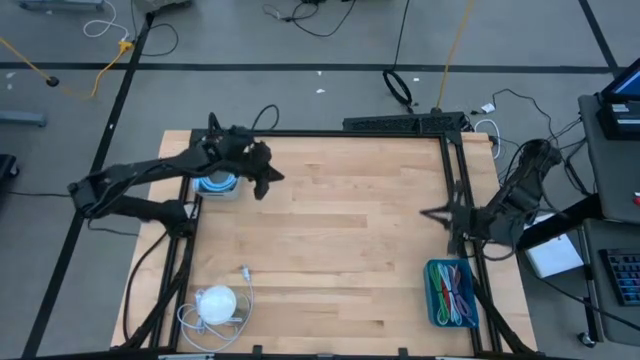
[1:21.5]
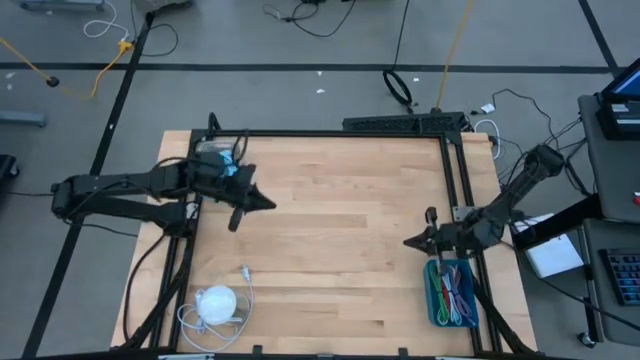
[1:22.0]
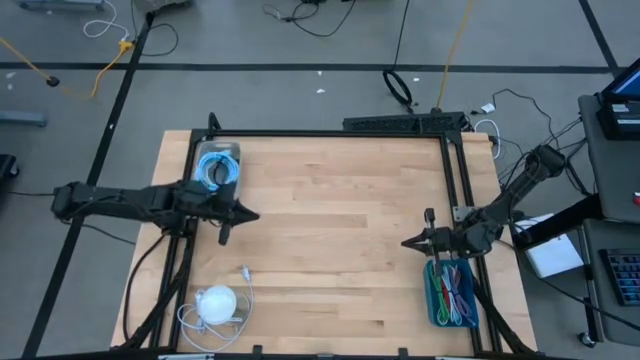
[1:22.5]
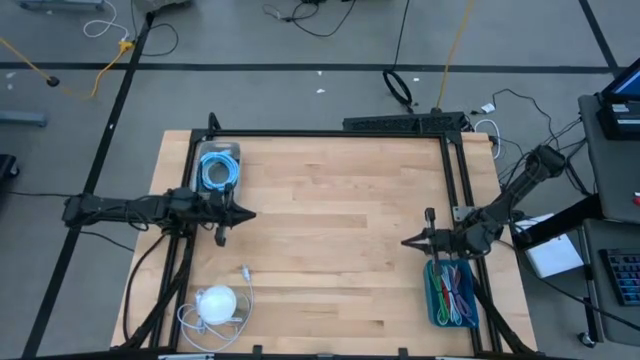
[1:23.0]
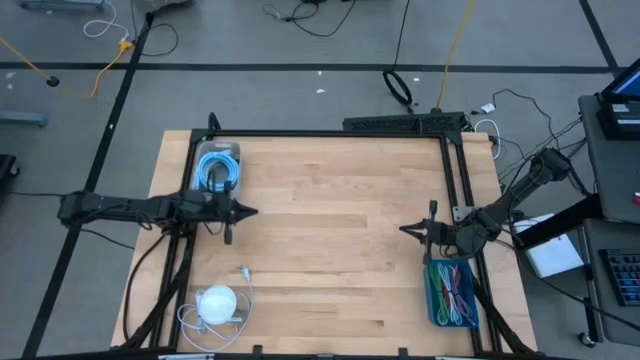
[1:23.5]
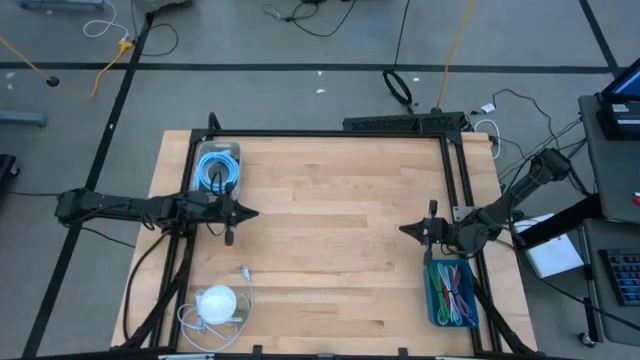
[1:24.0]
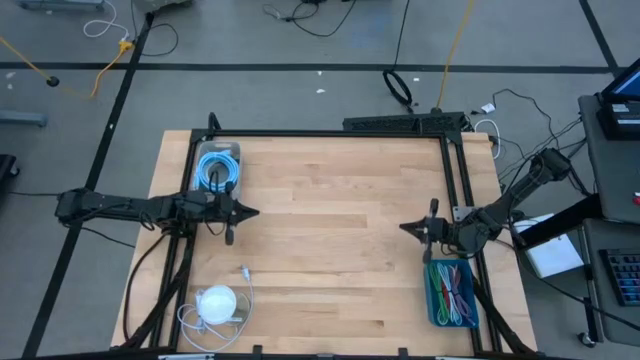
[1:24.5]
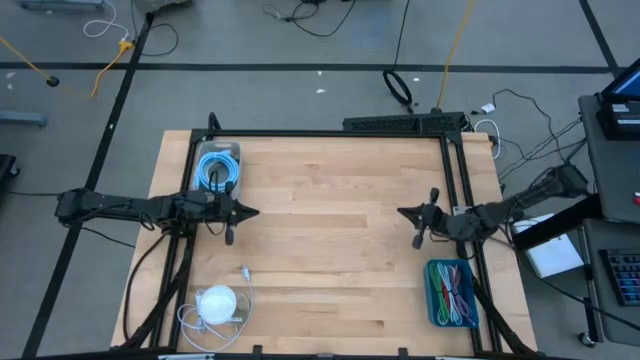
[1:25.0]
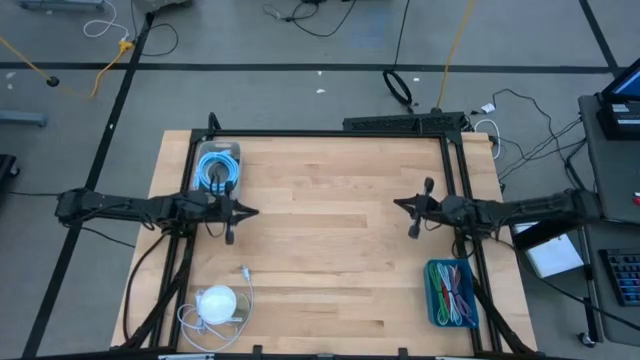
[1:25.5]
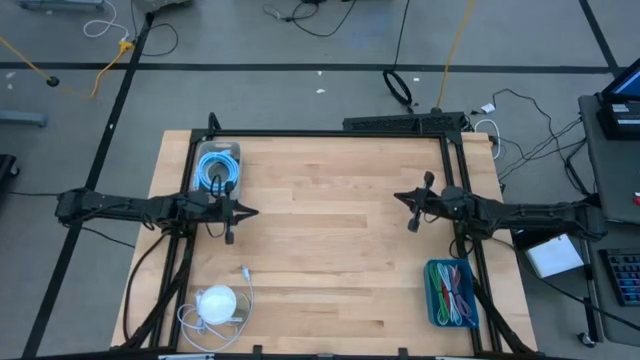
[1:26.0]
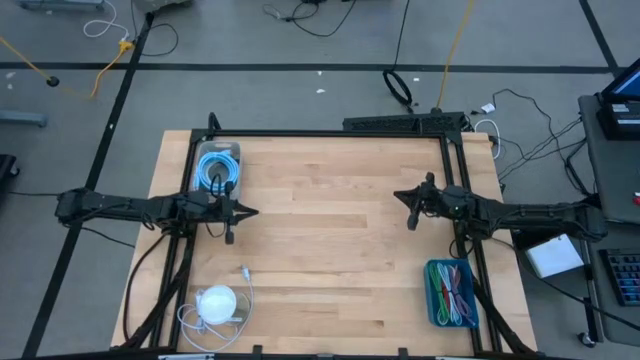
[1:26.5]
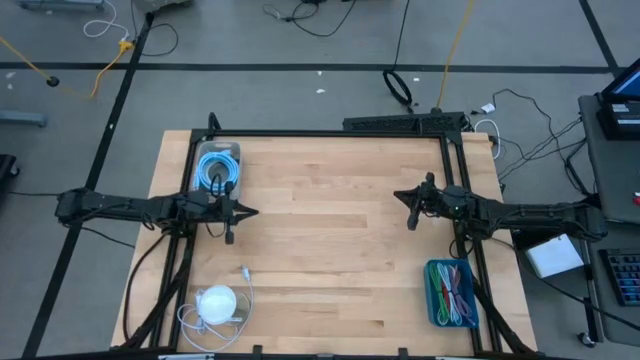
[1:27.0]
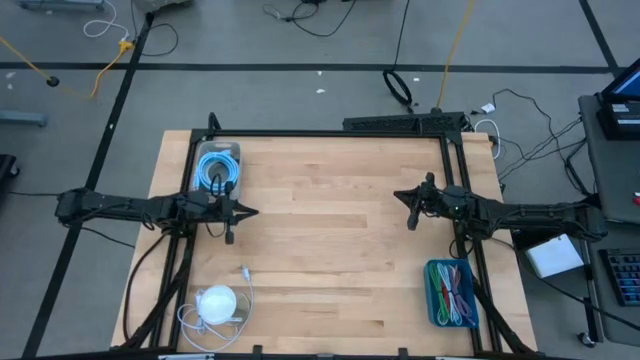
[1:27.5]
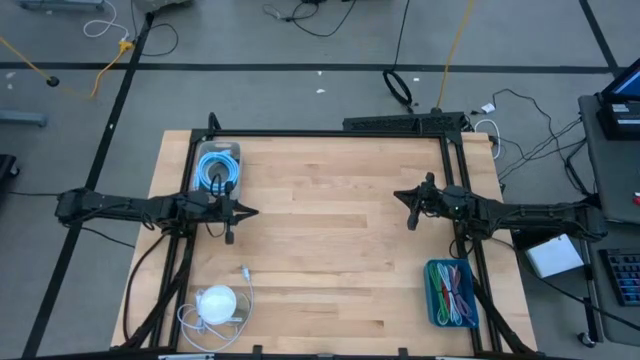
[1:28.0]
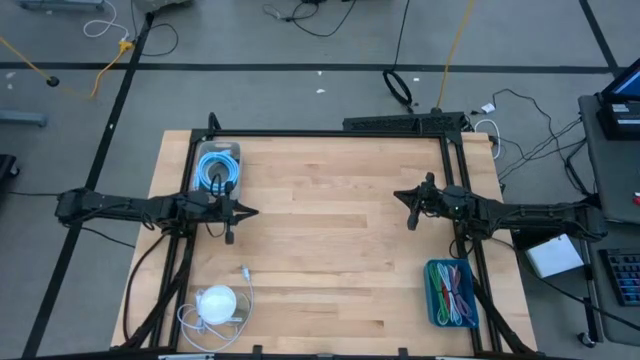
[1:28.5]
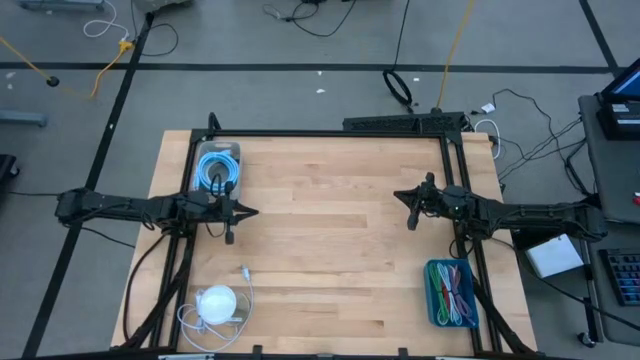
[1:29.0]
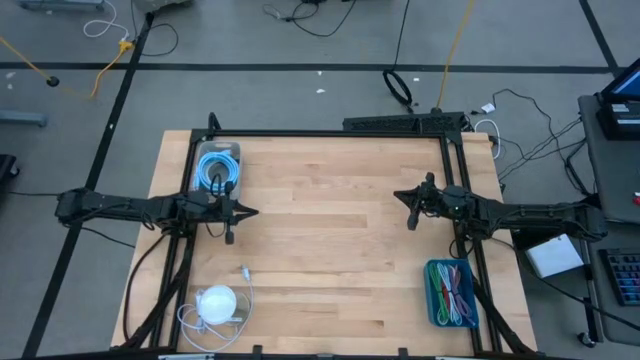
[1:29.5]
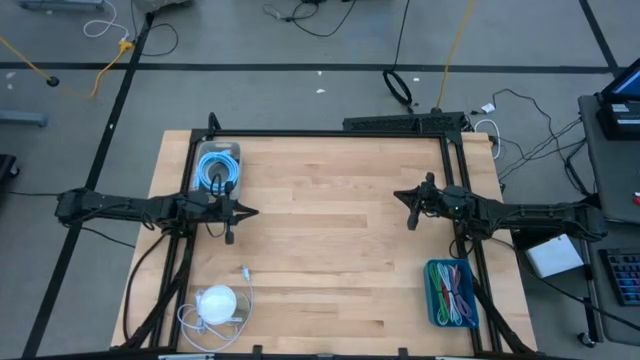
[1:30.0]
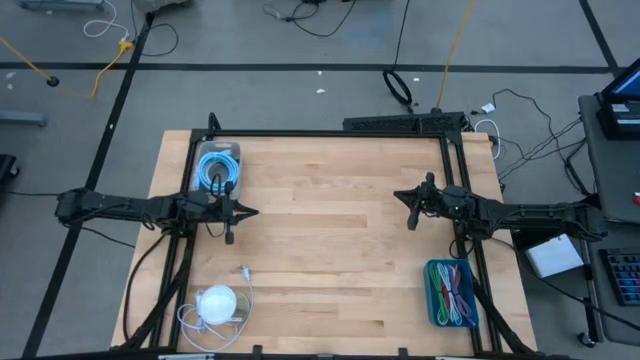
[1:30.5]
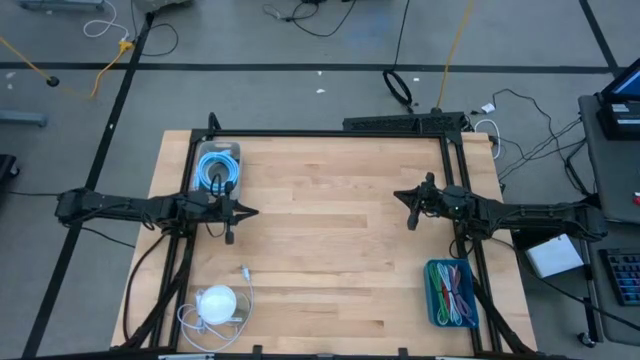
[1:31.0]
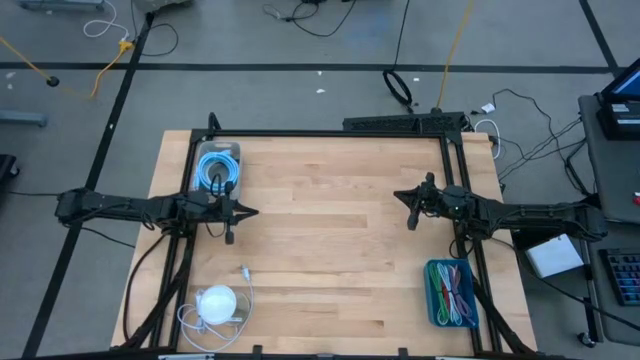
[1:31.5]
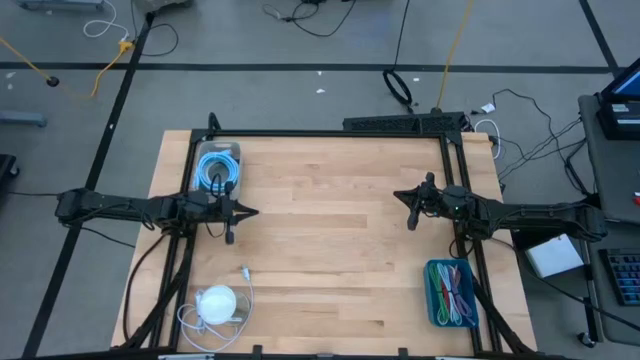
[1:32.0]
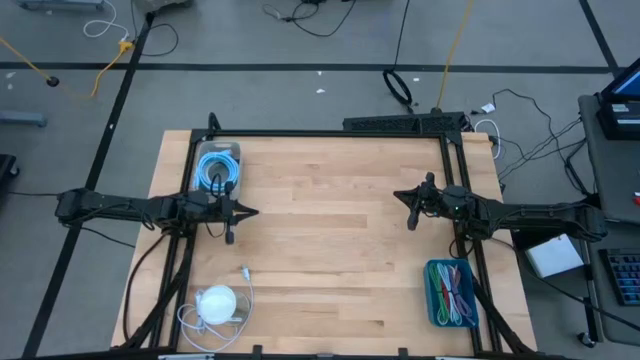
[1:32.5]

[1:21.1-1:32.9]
Task: Pick & Place USB Port
Return to Home Position

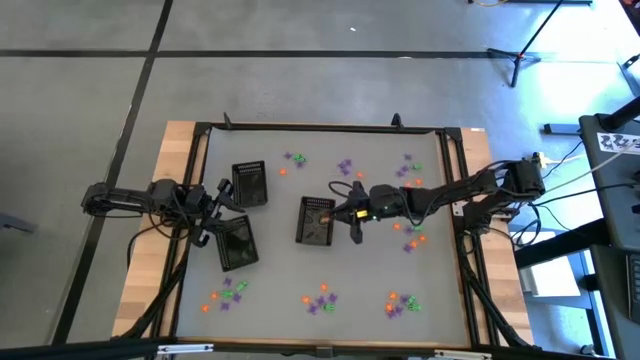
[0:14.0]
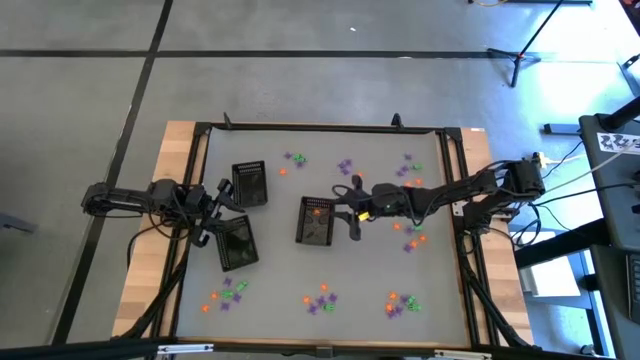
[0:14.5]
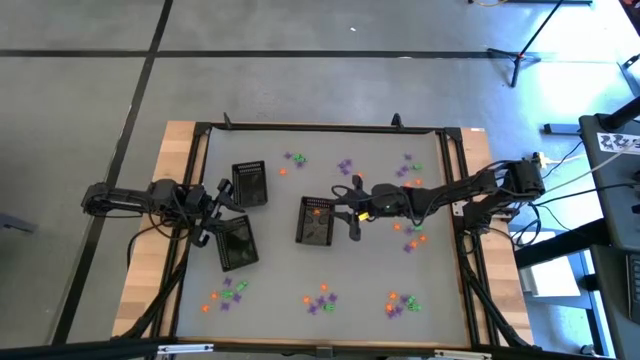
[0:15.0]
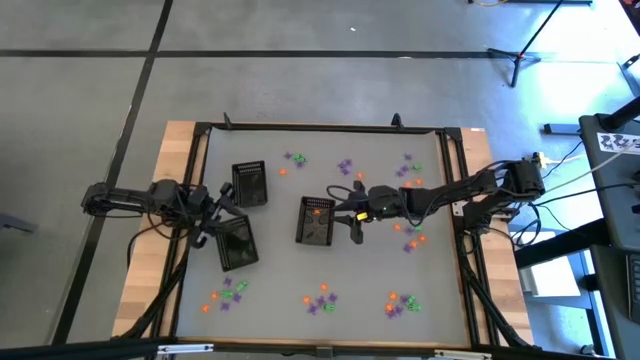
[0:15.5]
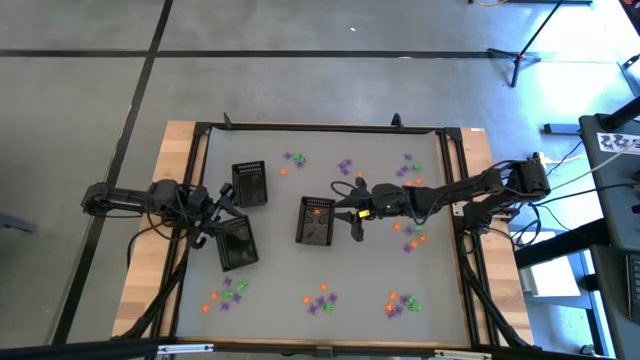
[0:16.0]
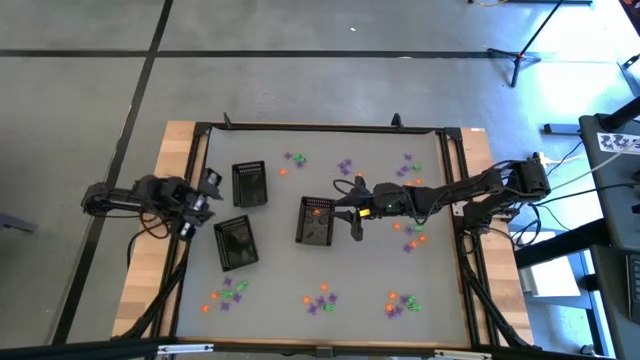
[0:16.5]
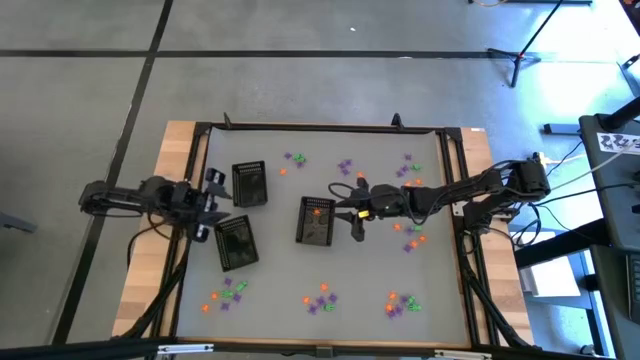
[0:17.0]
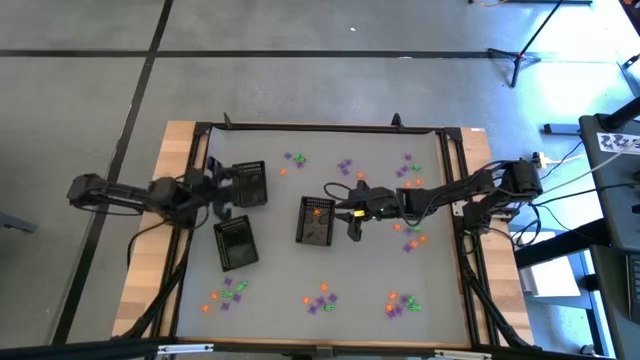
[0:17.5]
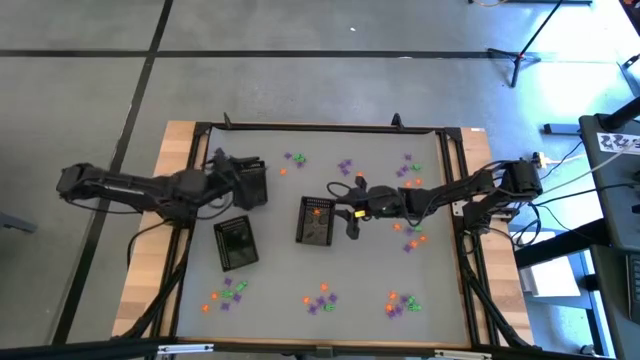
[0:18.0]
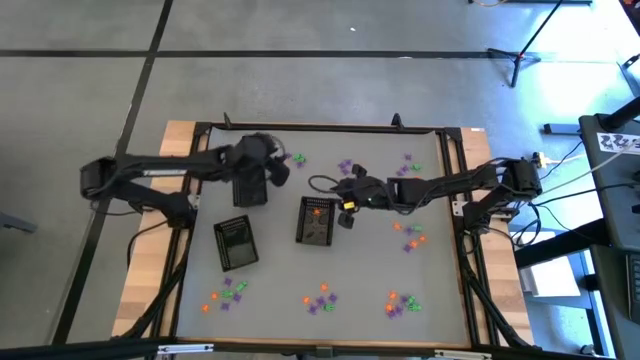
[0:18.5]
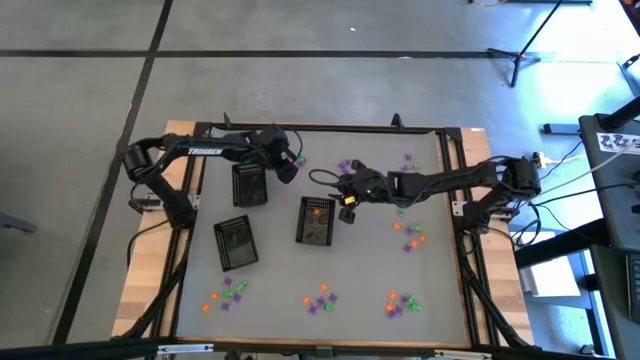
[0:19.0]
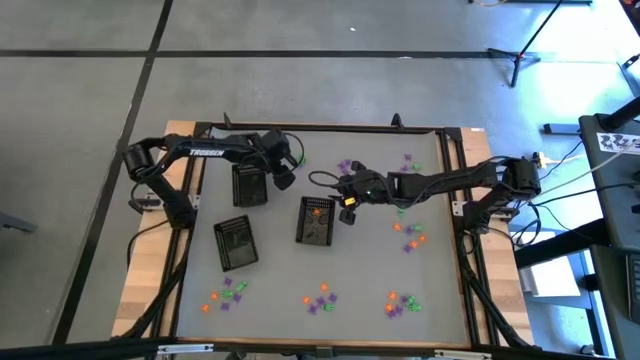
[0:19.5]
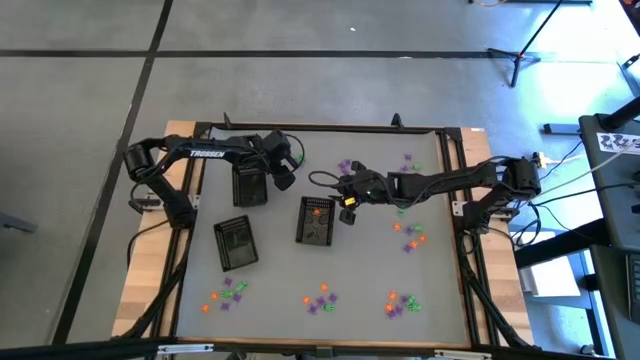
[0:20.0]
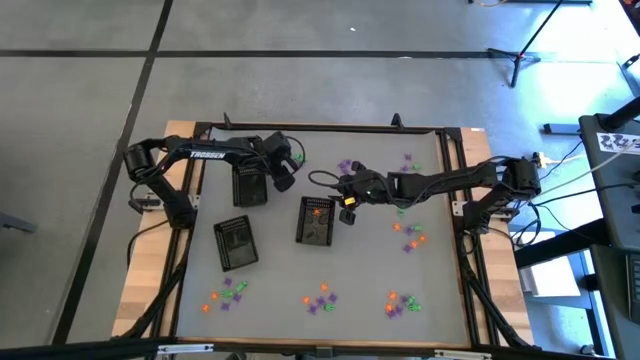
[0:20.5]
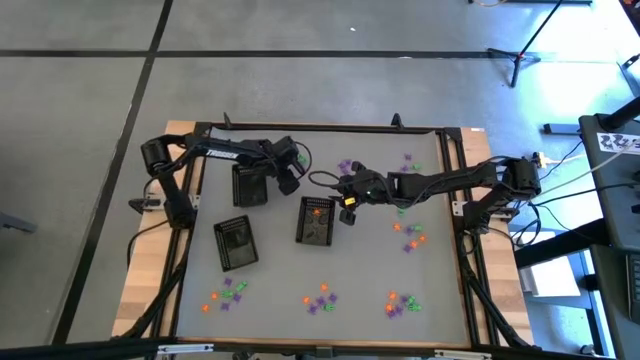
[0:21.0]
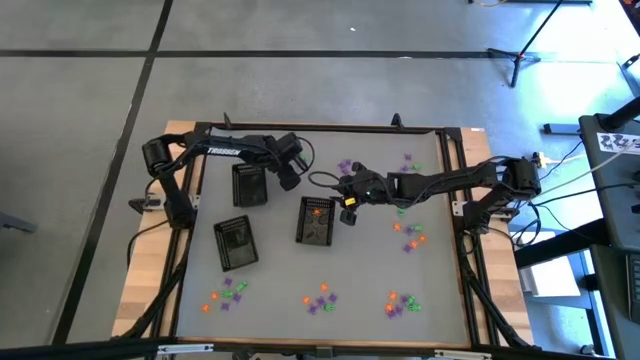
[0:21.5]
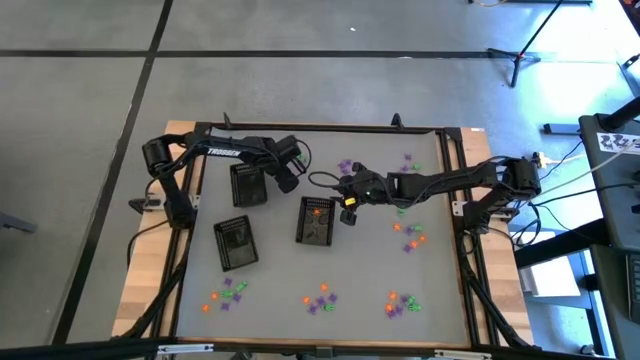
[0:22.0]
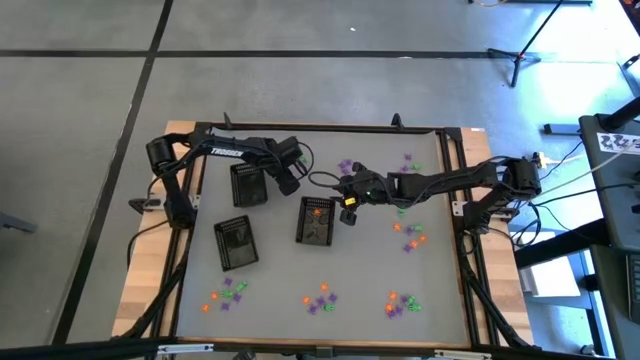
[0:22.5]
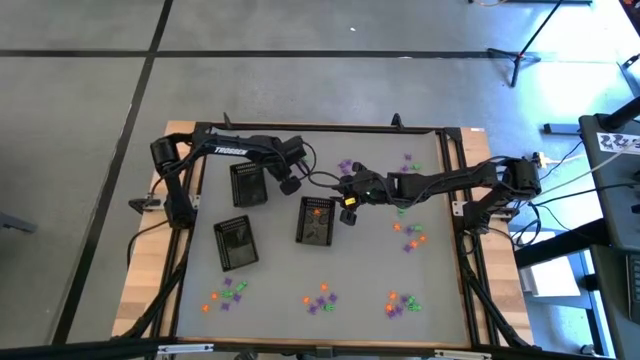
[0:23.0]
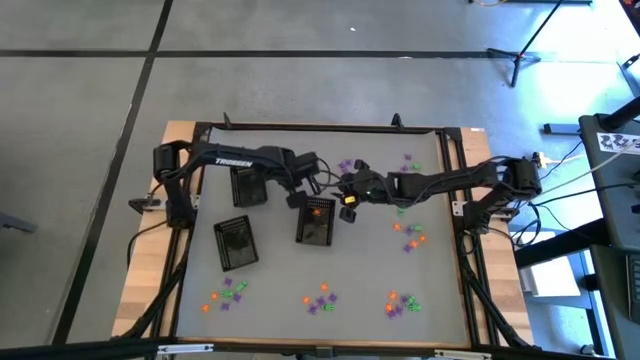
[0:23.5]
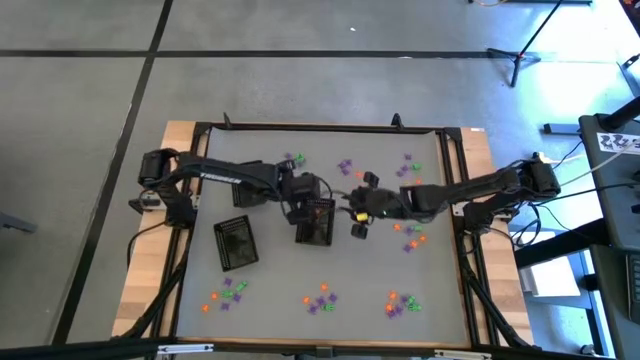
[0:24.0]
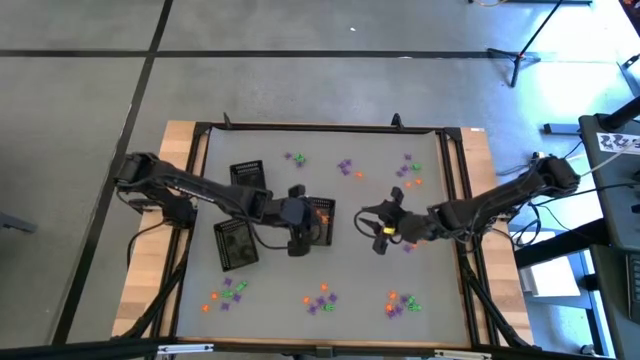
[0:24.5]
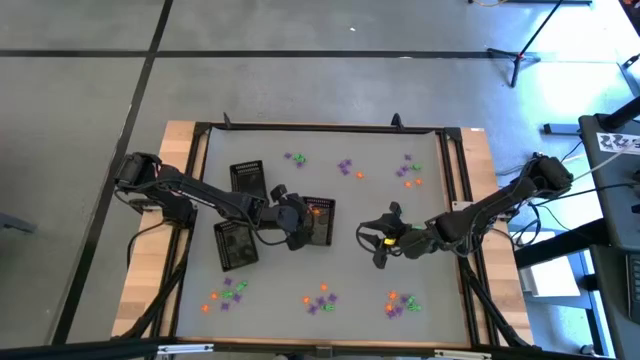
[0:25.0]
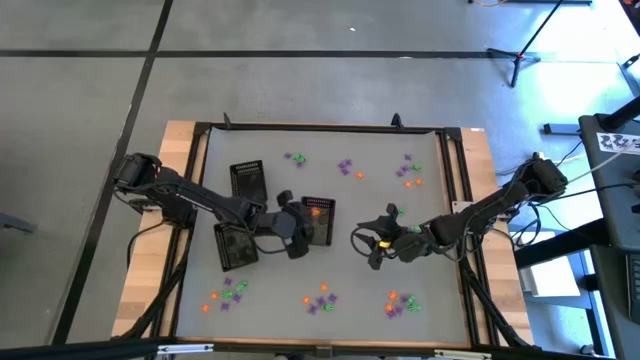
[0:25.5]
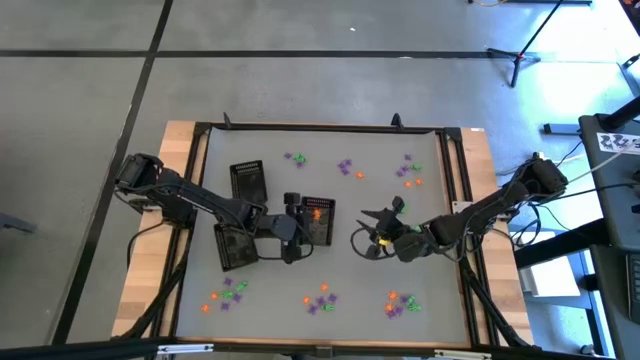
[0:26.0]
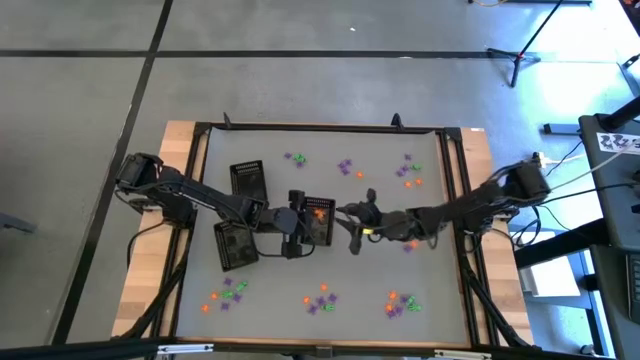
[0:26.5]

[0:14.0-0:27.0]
Task: Sort Halloween decoration
Put the orange spider toy into the bottom right black basket
